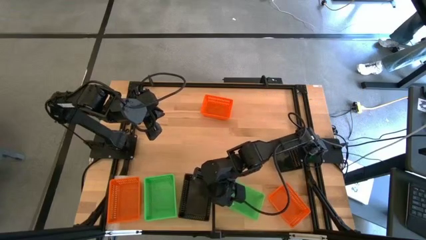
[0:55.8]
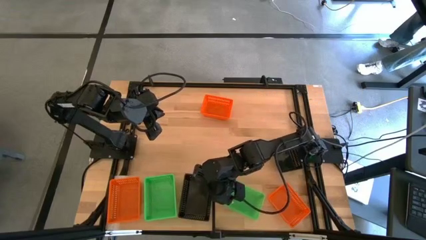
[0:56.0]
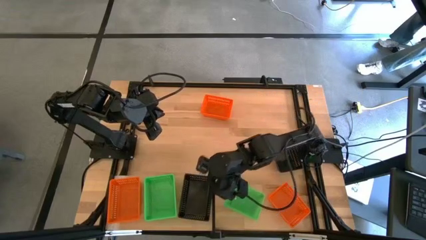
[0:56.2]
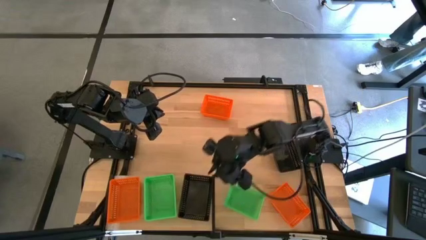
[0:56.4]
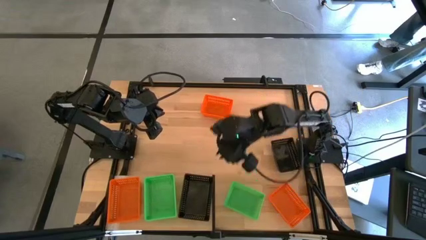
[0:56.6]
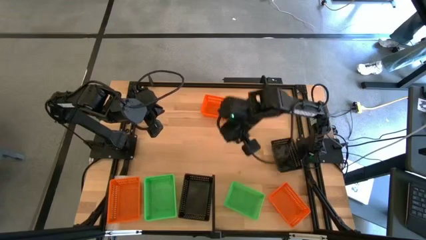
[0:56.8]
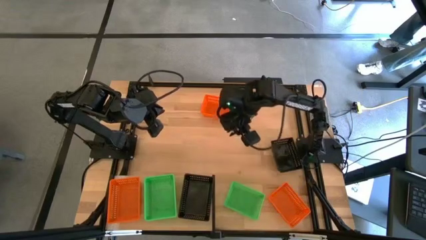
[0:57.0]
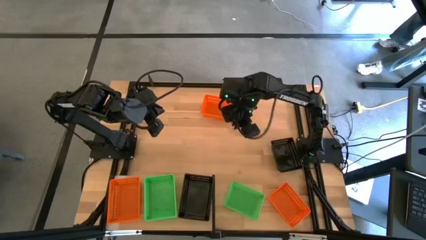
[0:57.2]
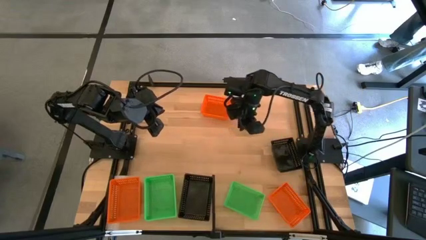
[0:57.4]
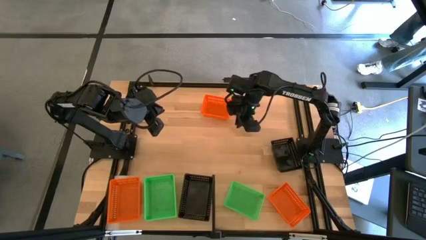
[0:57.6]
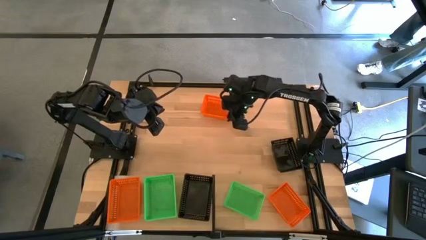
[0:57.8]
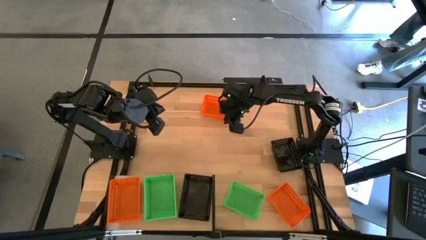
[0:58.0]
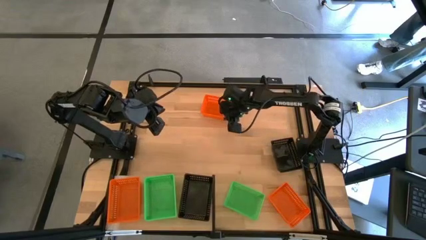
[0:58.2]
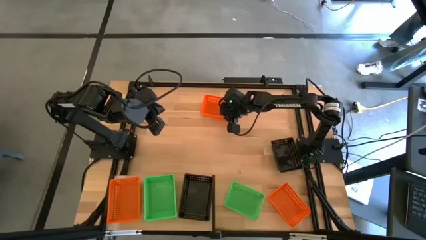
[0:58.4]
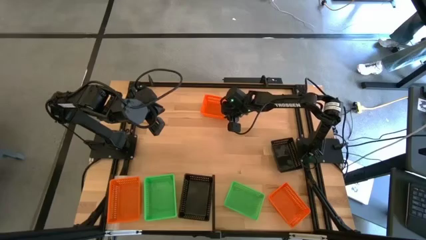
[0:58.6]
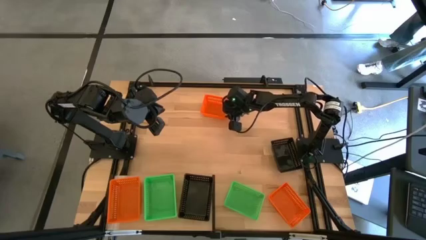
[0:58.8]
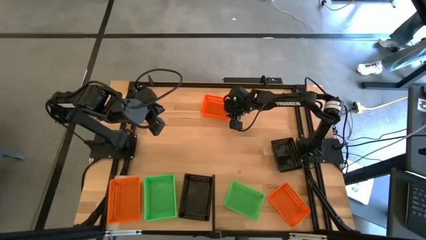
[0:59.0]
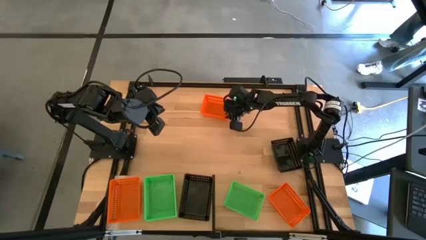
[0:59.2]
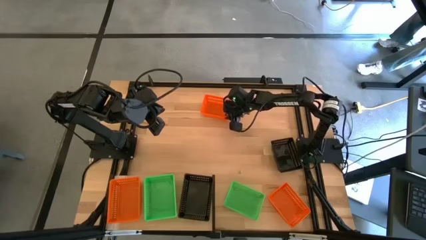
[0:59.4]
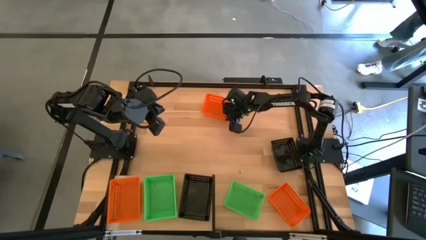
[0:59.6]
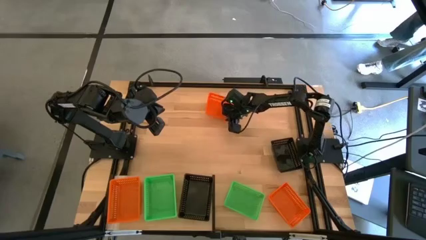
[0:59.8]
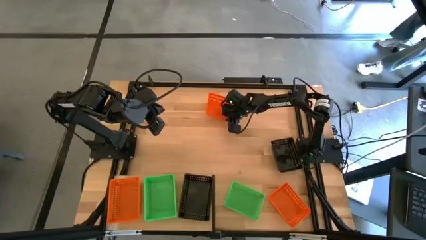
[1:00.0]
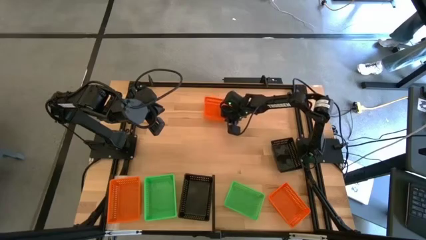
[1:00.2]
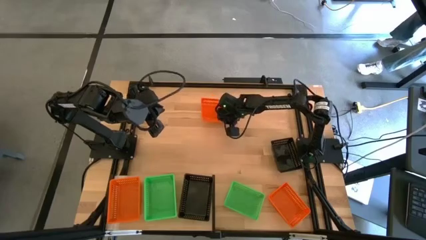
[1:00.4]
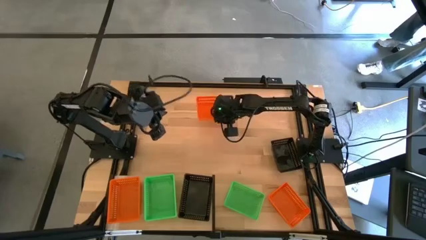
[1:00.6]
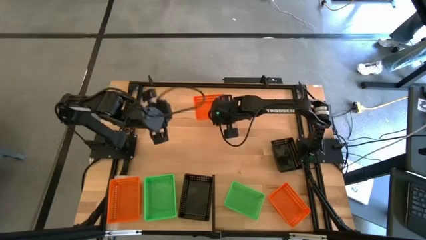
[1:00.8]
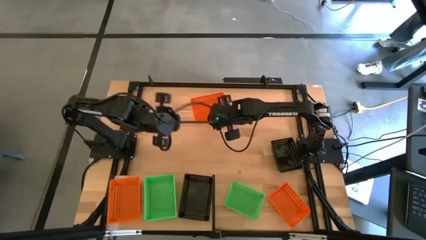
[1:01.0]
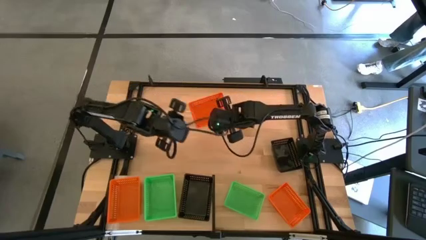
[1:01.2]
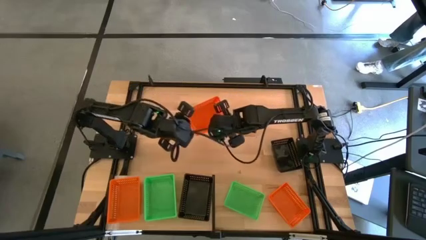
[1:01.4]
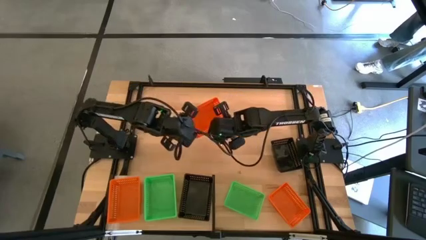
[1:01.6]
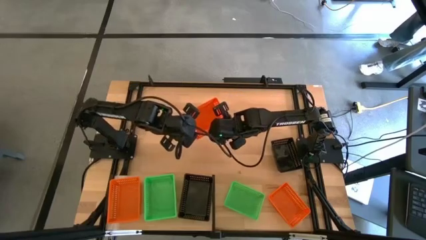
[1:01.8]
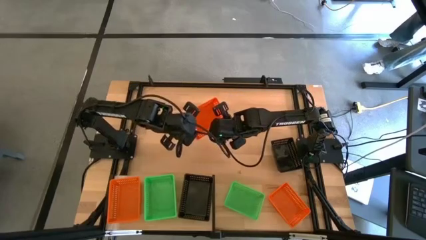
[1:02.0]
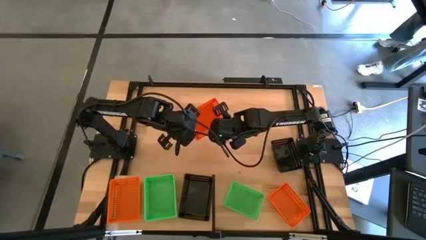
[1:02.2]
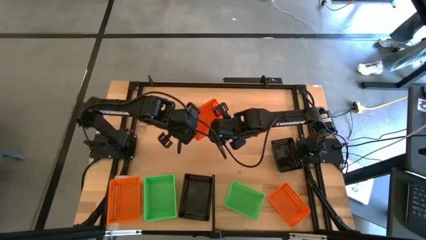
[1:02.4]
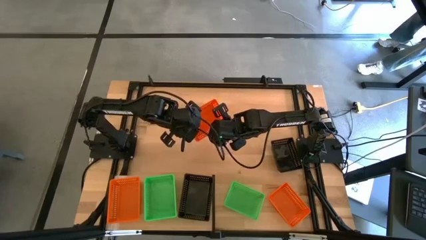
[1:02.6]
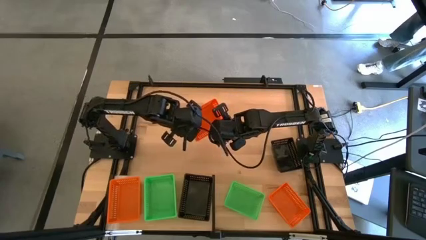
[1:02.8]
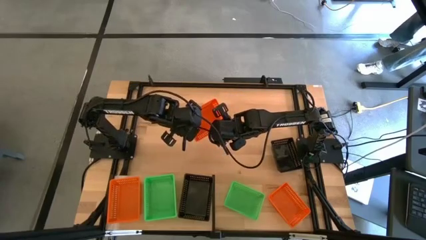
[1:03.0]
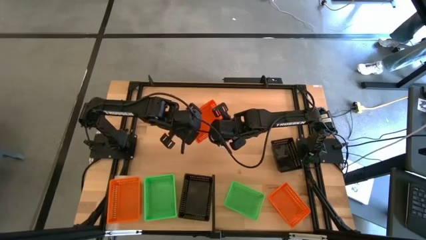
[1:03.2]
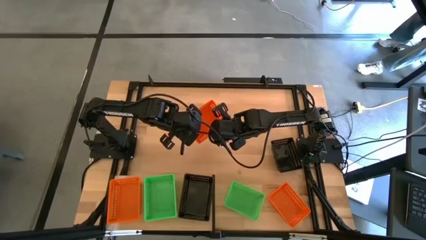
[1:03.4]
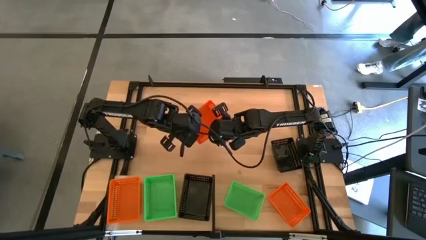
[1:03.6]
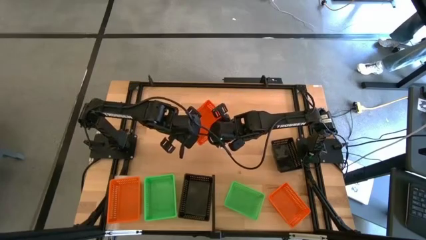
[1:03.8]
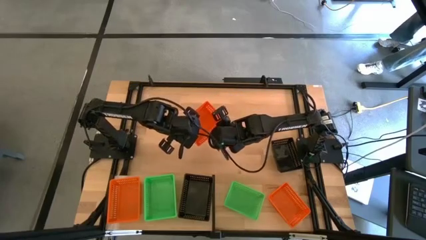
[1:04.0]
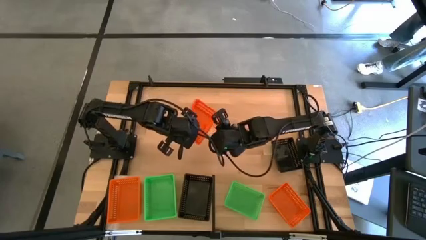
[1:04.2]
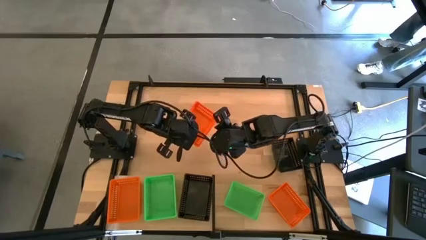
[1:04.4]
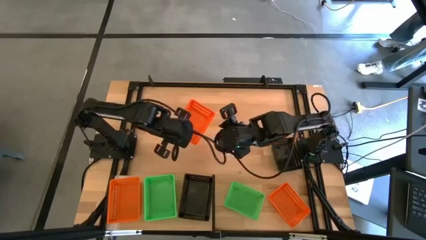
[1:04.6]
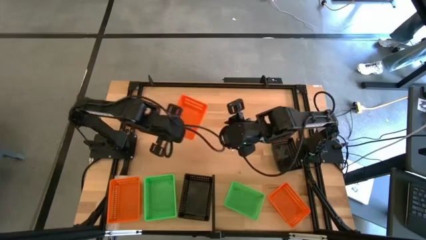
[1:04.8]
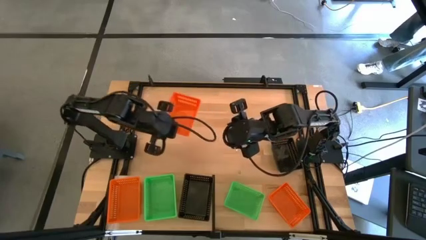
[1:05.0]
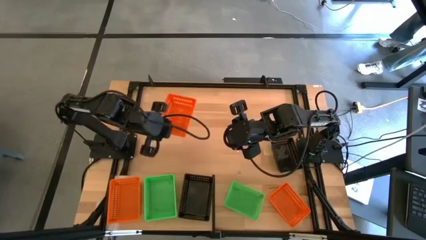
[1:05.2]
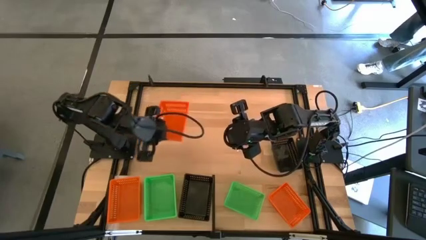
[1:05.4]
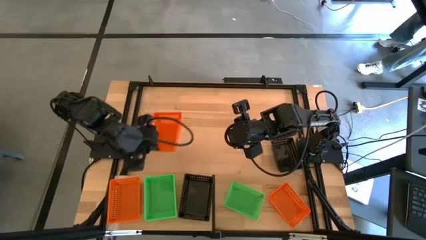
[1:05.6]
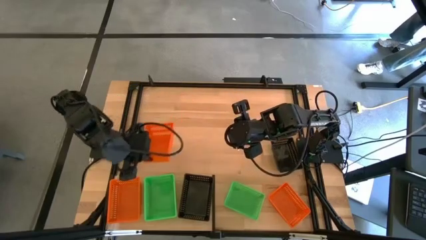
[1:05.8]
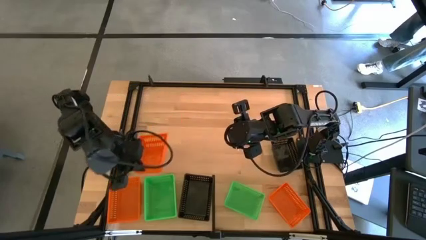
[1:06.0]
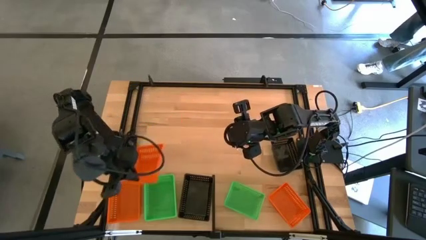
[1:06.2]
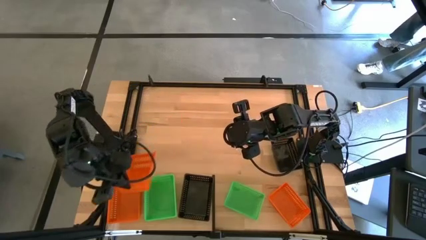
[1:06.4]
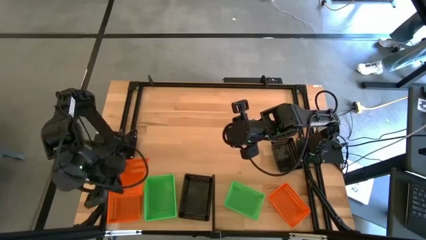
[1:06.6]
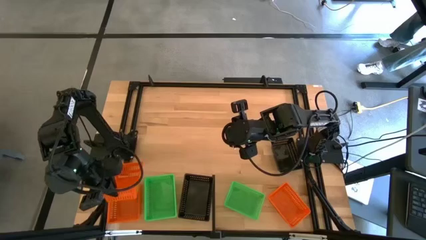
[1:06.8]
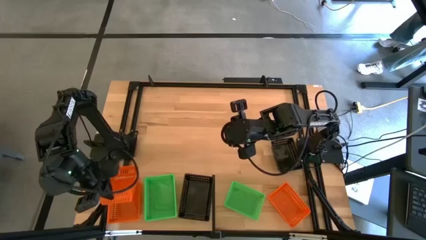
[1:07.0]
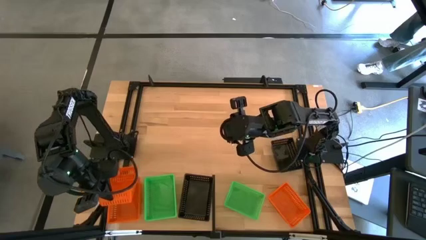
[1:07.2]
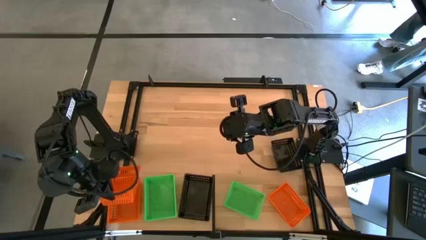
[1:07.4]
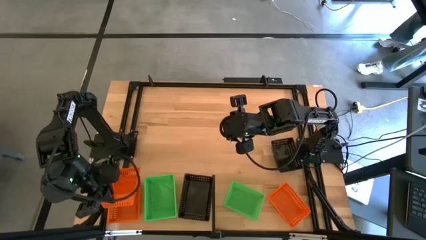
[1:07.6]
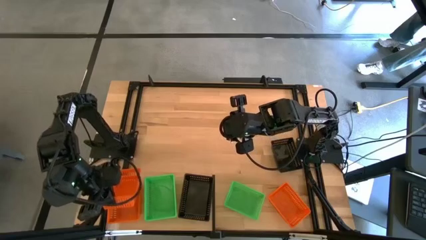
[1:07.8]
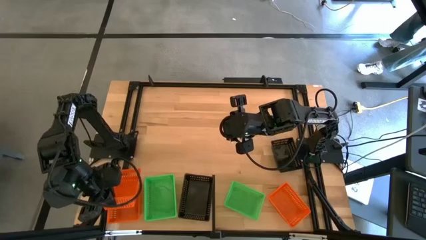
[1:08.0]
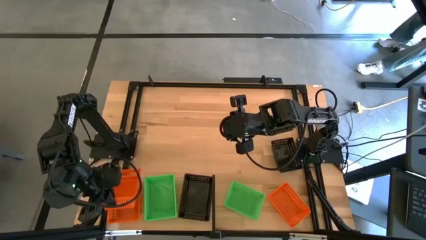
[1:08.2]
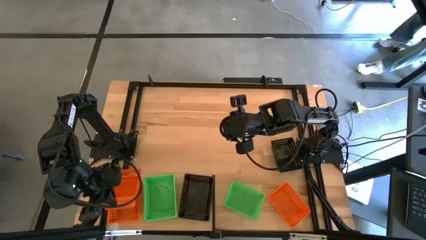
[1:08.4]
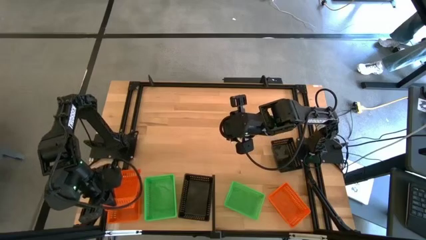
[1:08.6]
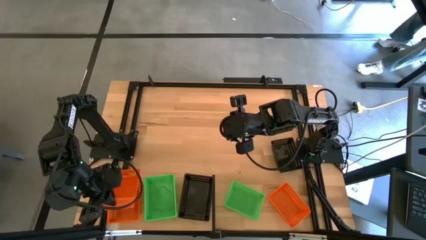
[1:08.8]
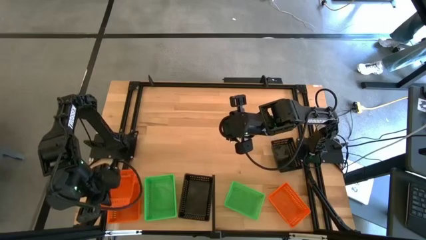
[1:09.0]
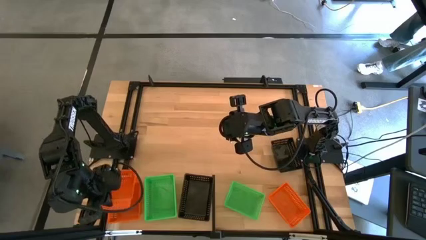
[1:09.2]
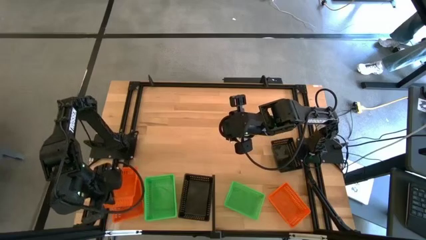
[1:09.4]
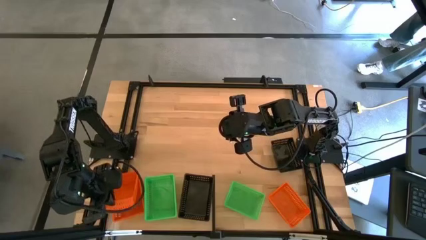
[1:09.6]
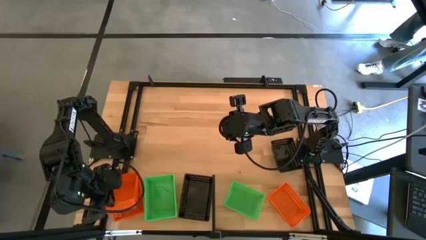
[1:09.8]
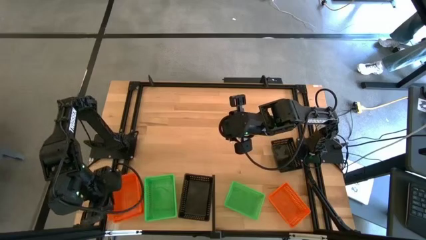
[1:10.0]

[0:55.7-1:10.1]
Task: Stack baskets on shelf by color
Stack the top orange basket on top of the other orange basket on the shelf

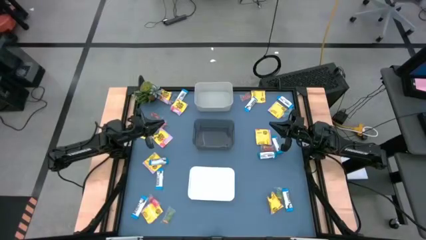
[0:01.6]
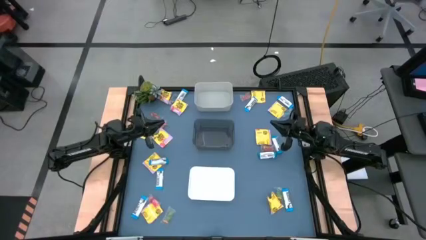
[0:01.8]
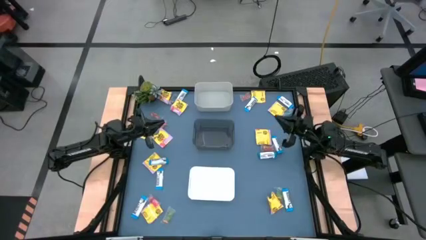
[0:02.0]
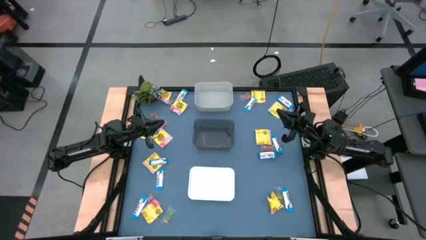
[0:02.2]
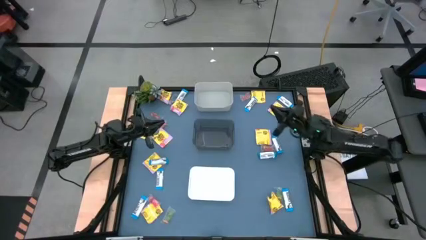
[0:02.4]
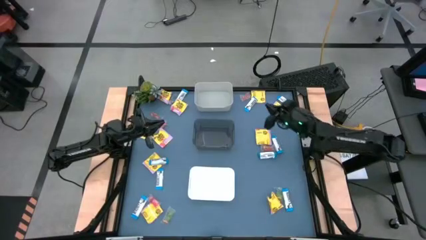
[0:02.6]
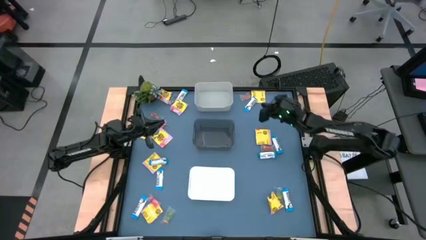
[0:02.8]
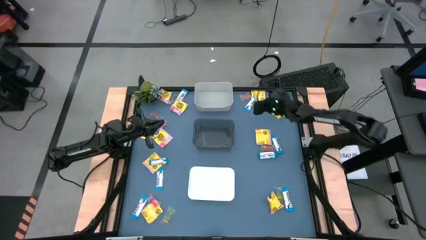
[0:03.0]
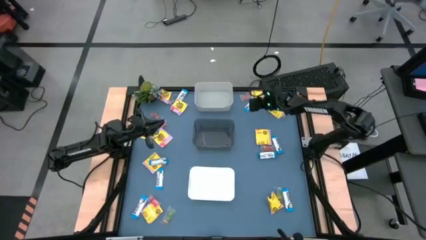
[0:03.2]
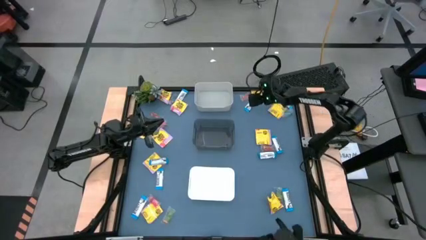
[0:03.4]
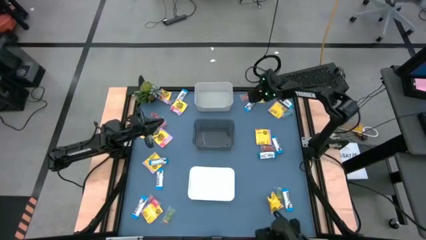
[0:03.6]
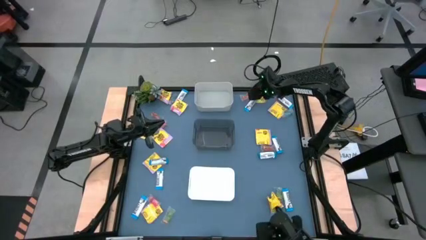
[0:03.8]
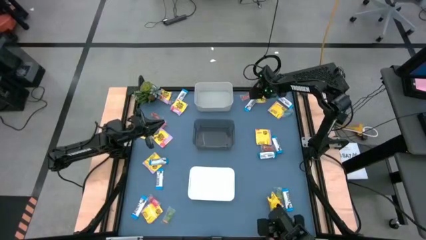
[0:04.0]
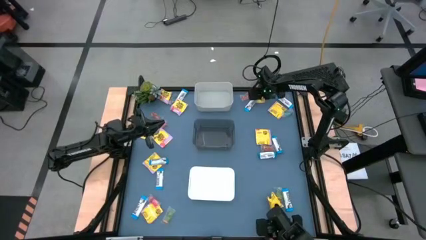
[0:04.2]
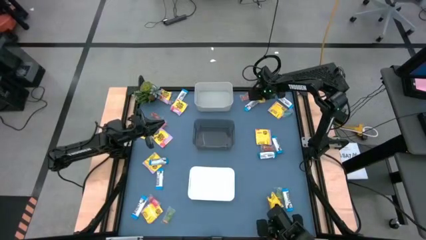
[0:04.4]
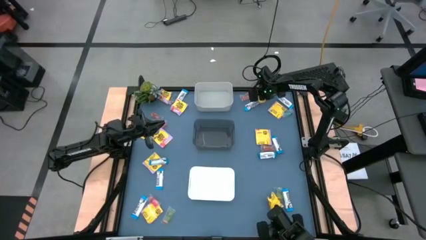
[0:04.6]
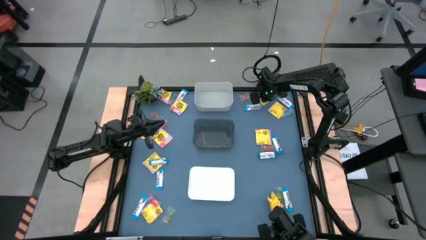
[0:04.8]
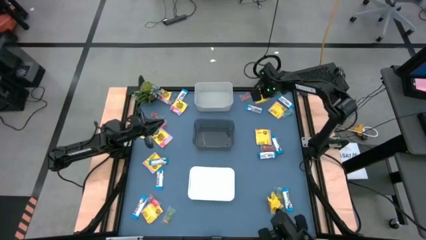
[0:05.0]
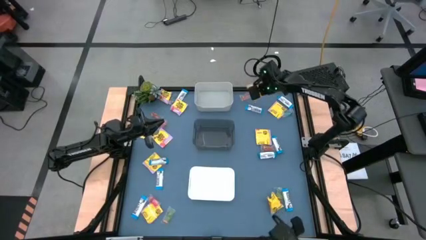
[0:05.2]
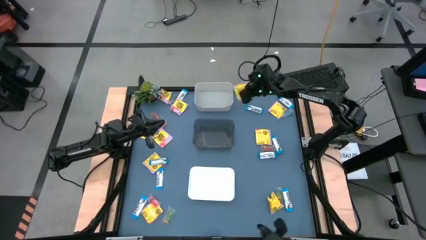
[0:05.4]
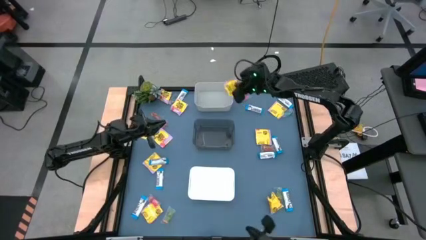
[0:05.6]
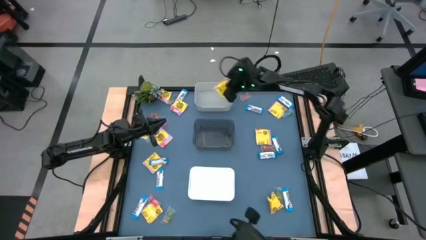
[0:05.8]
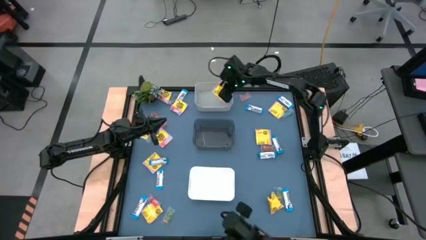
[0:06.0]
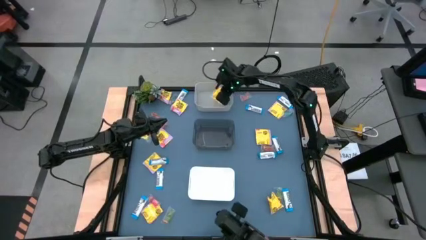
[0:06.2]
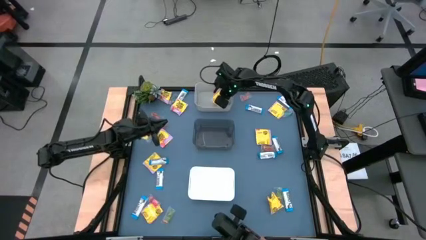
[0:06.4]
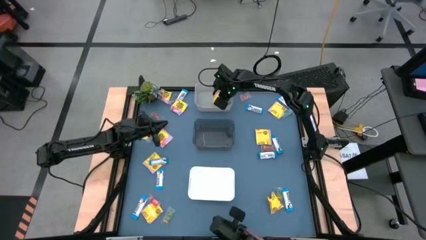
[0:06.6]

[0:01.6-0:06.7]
Task: Sort candy
Put the yellow candy into the black bin
